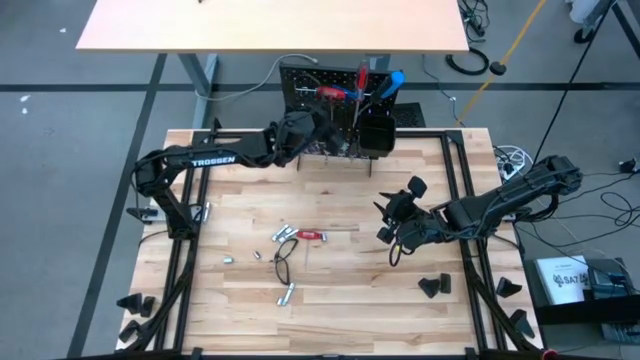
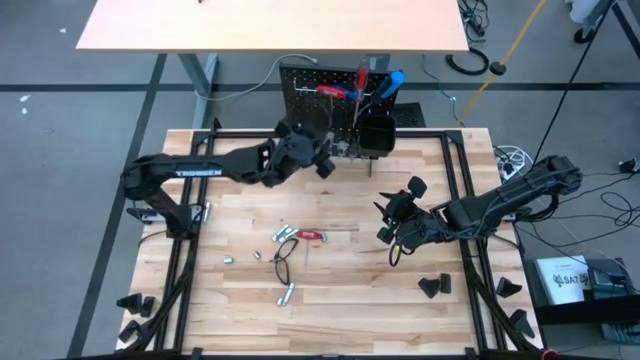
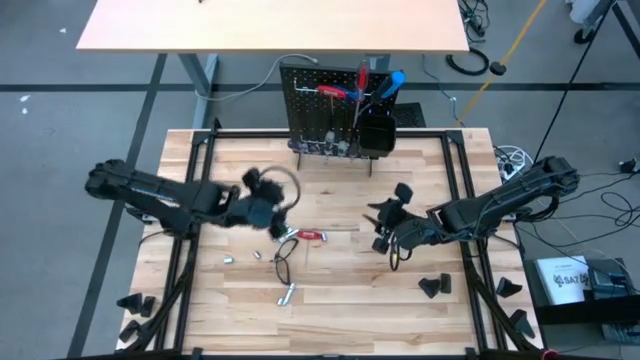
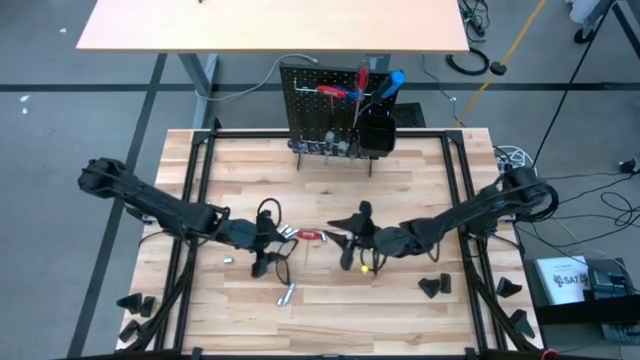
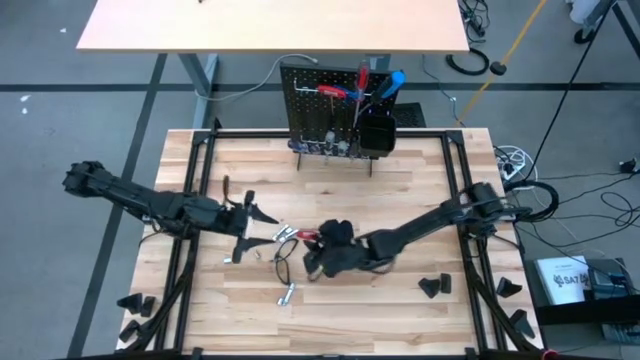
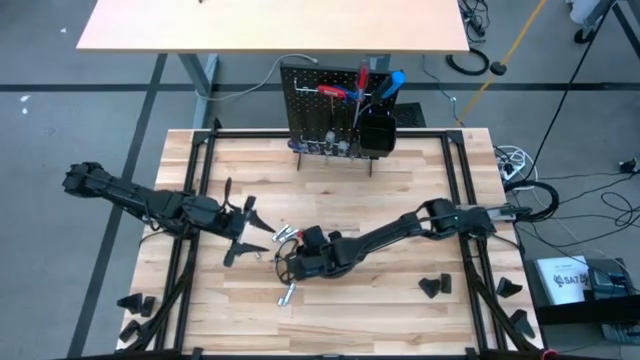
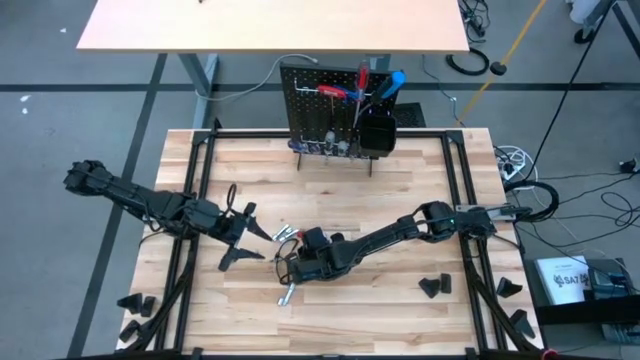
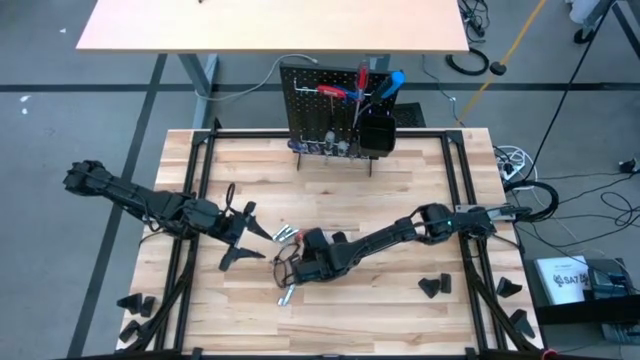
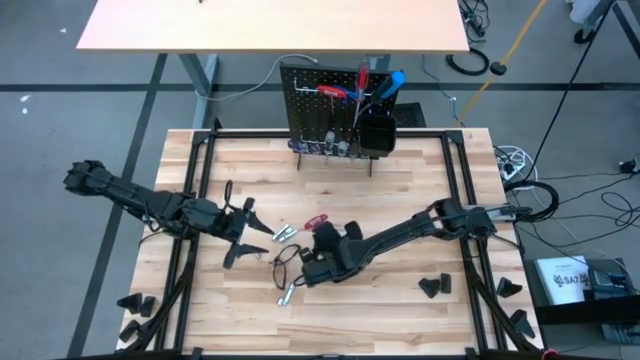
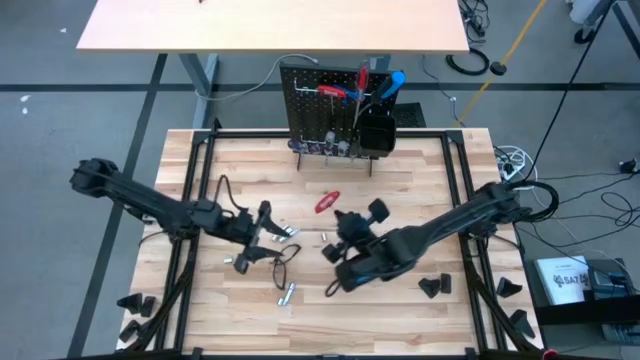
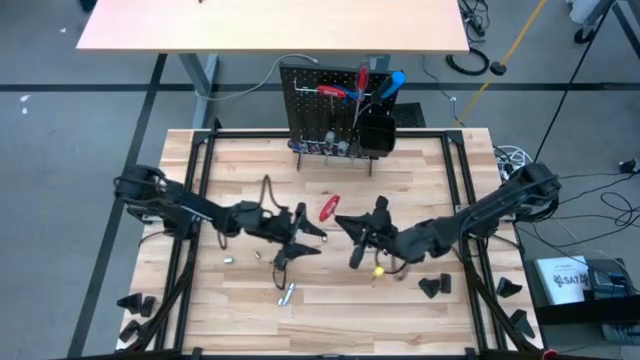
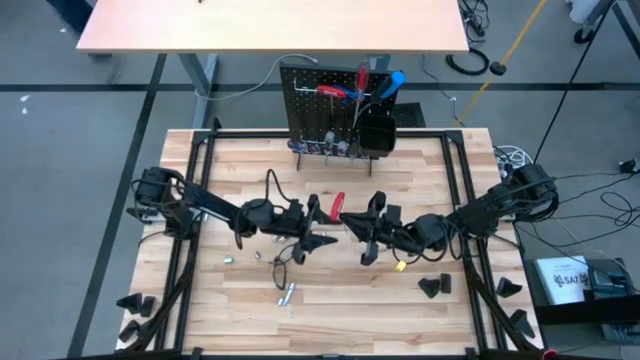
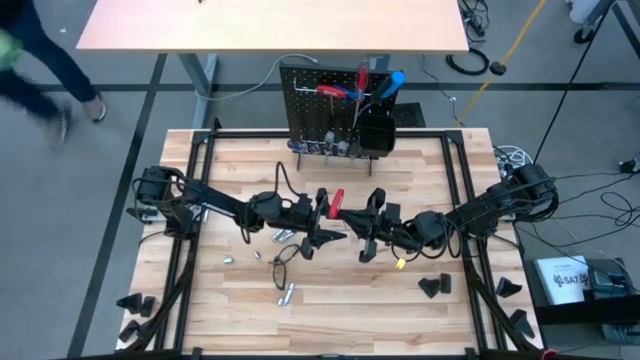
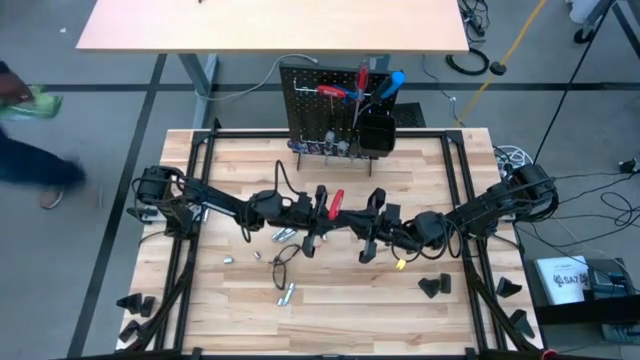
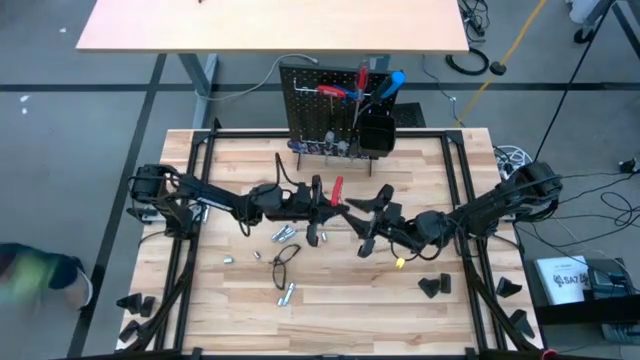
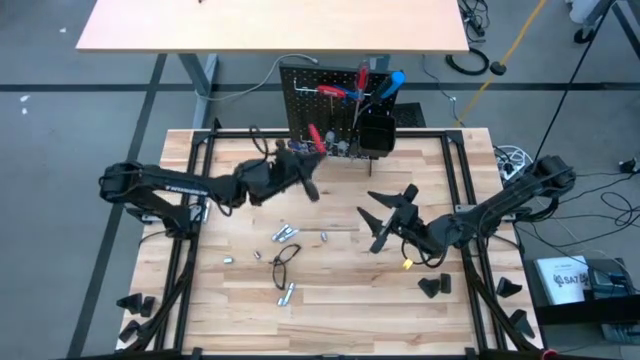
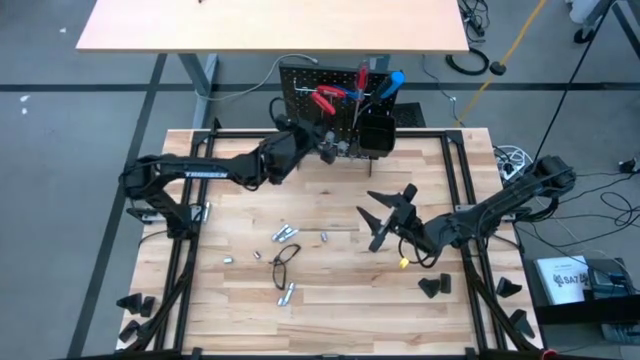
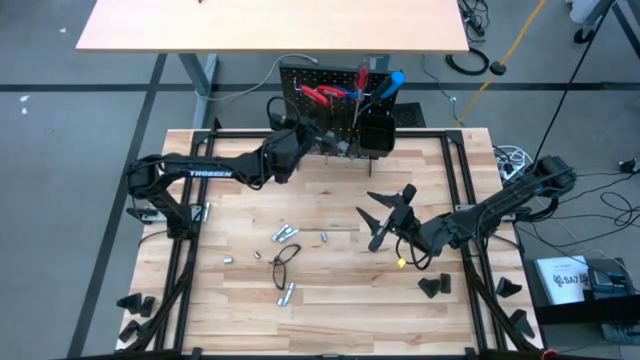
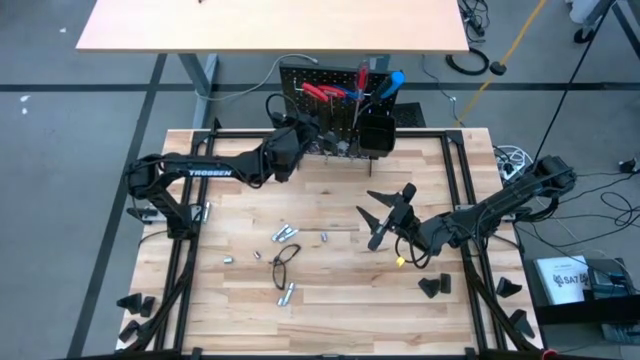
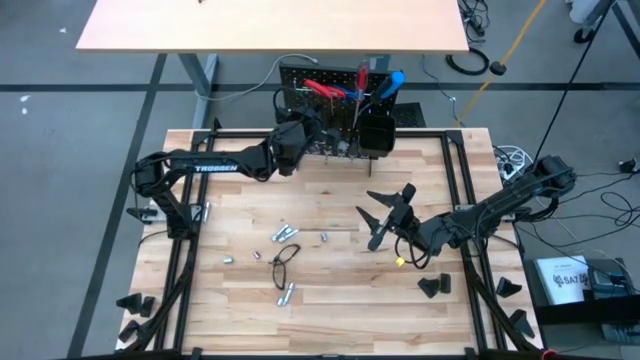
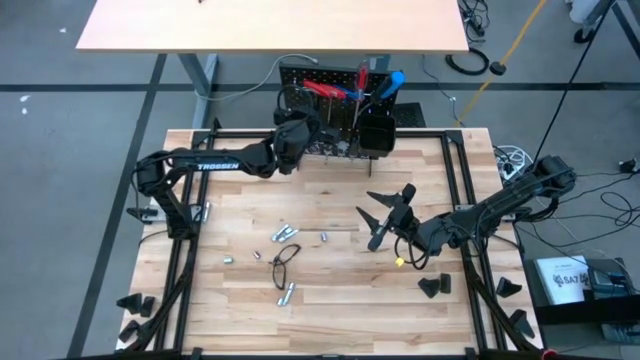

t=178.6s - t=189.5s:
Task: Hang tools onto peg board
Hang the red allen wrench onto the peg board

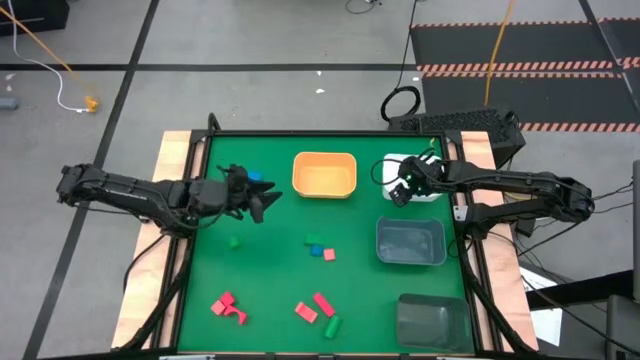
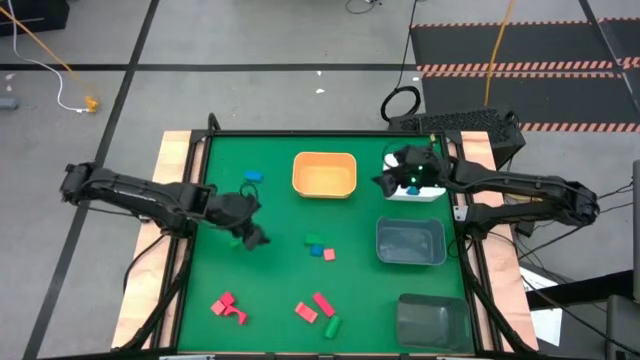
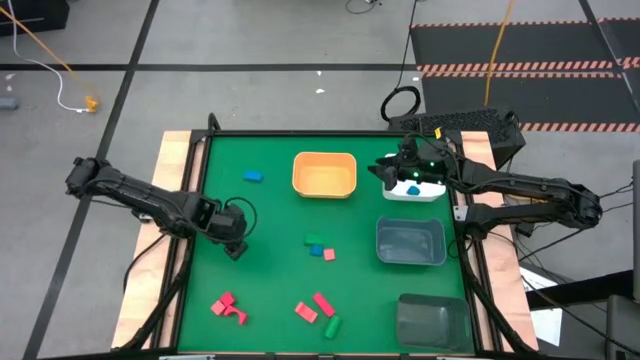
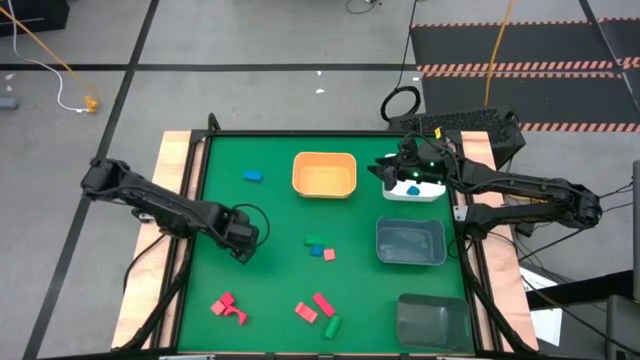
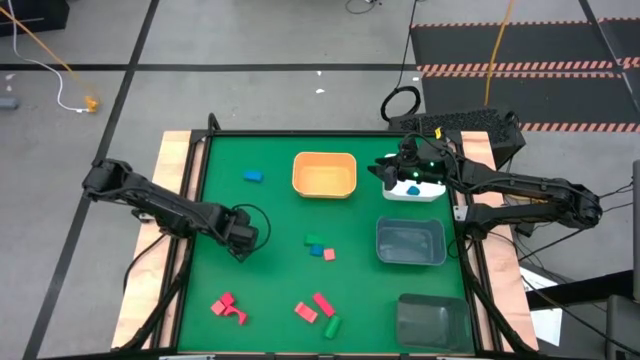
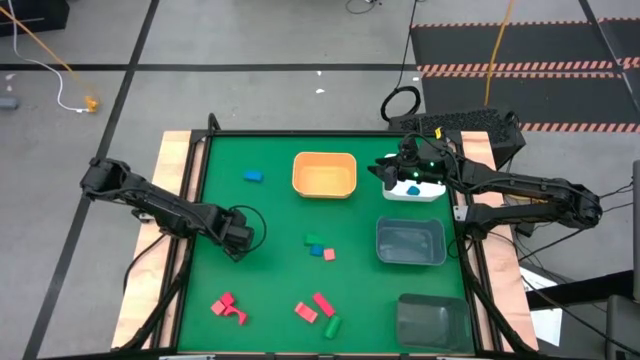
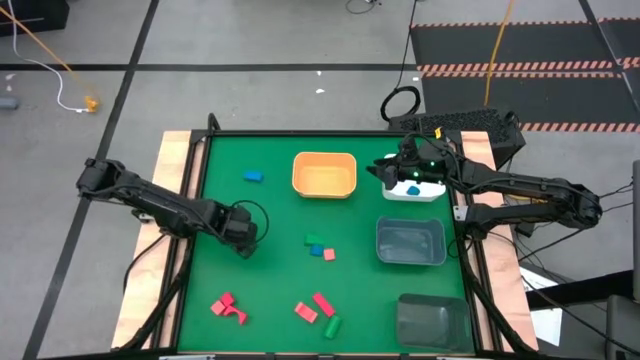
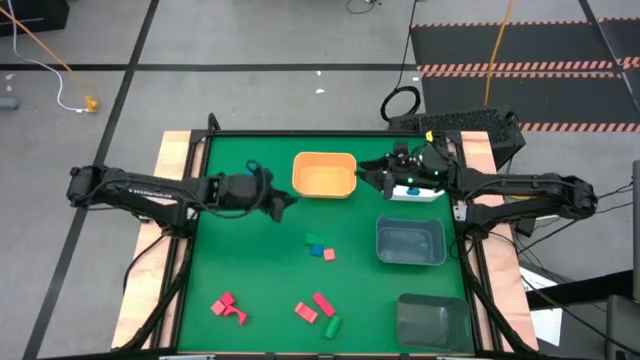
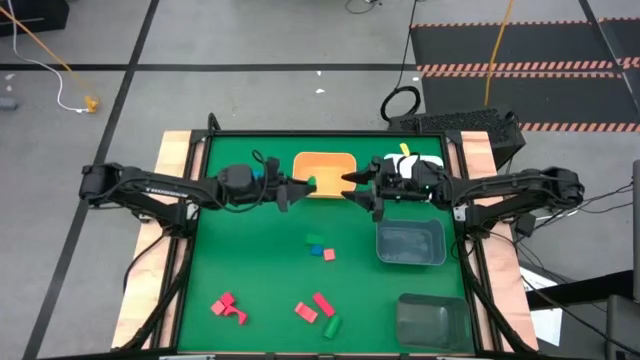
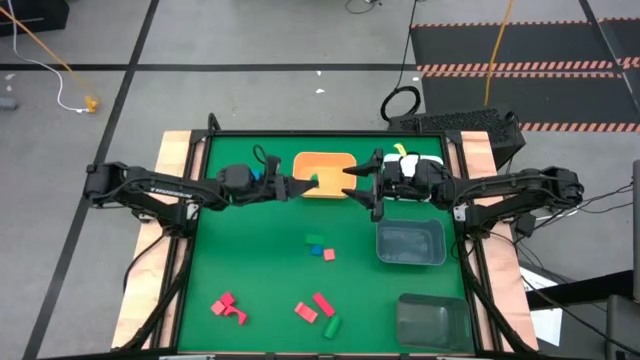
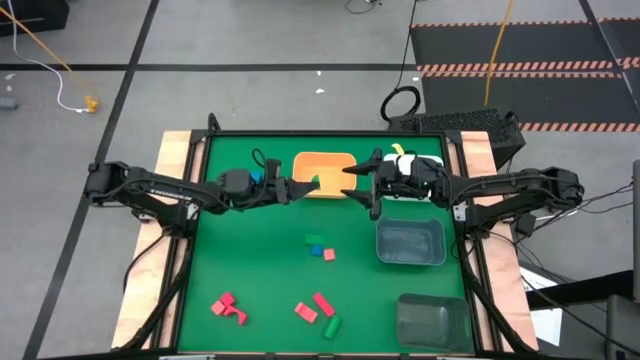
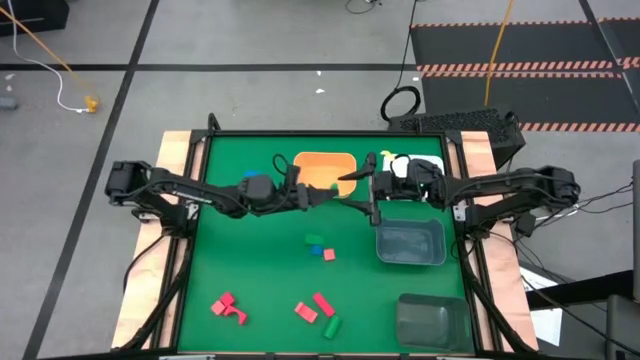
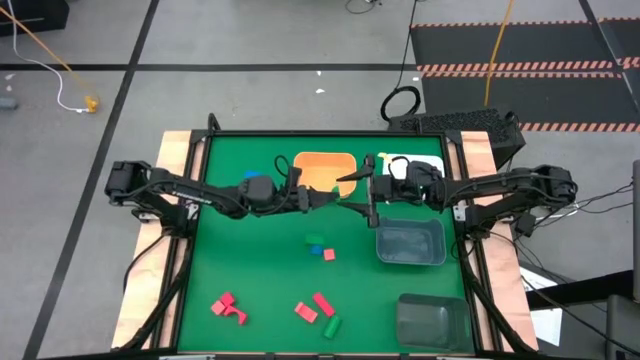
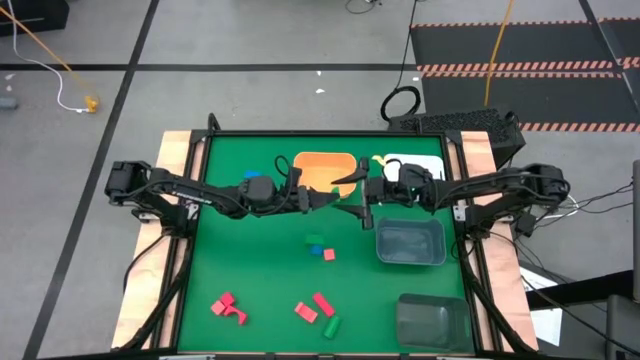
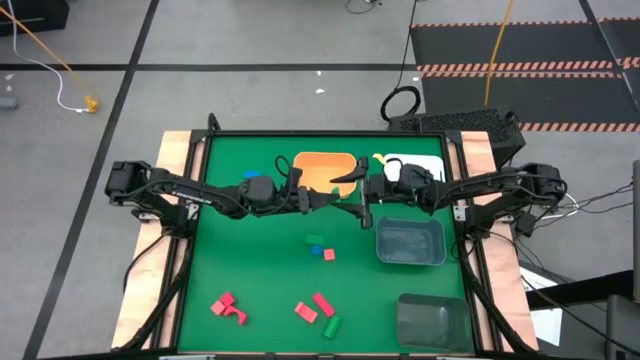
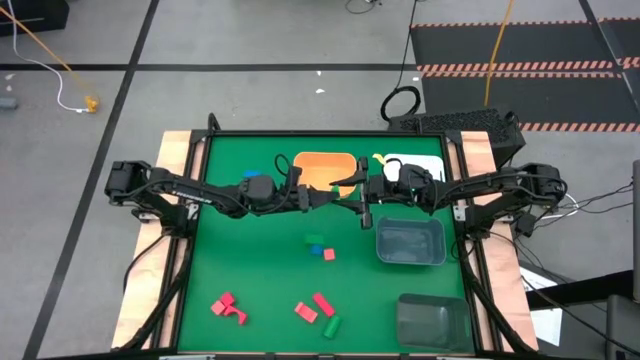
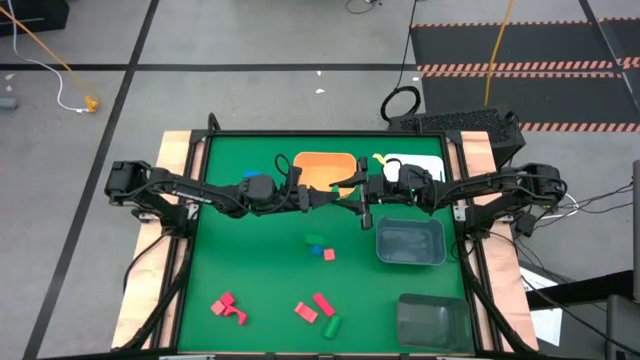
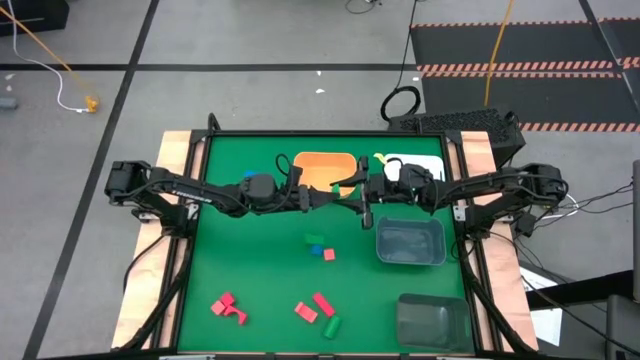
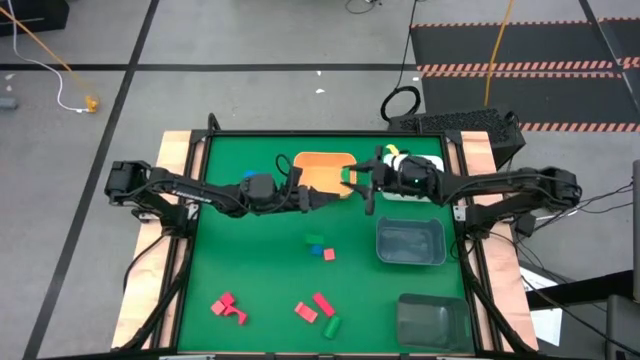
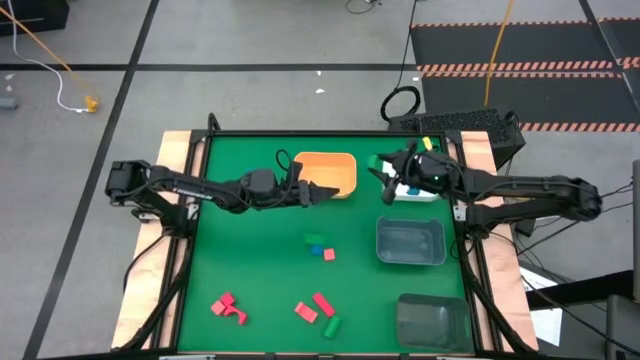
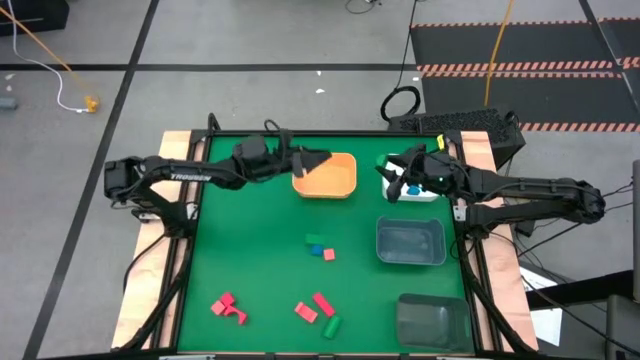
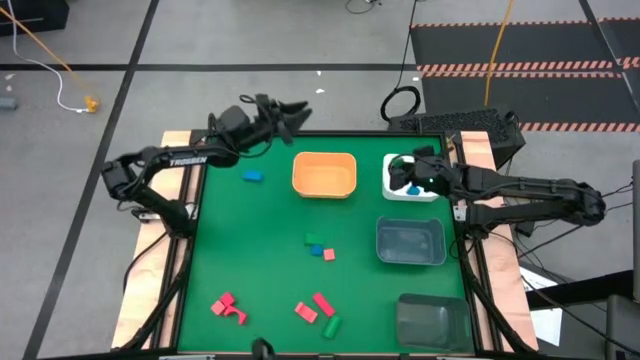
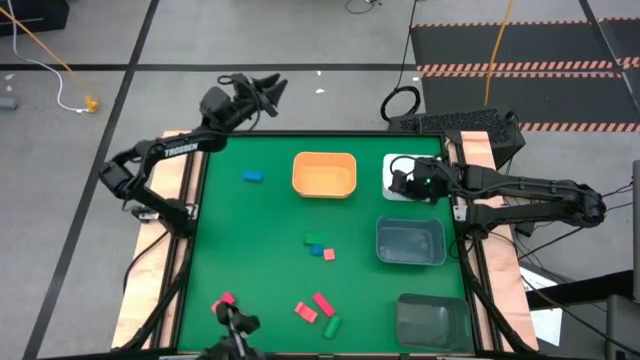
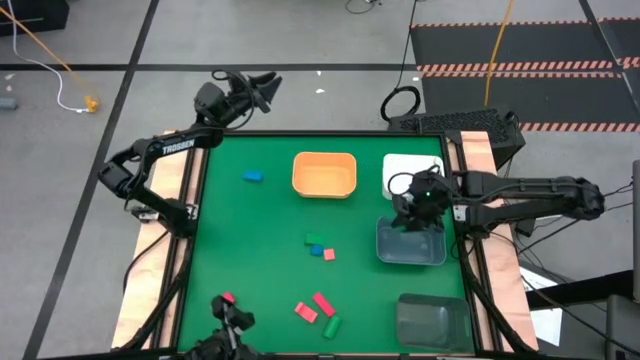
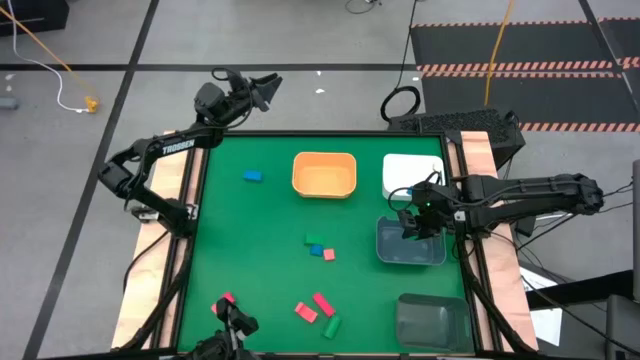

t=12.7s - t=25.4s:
Task: Sort & place blocks by color
Put the left green block into the dark blue bin
